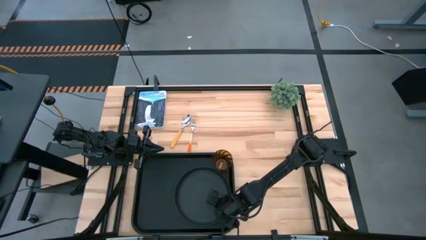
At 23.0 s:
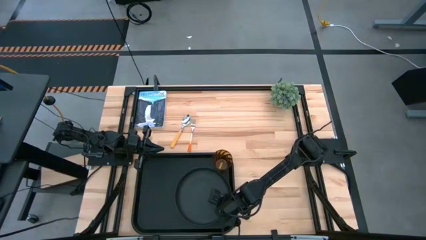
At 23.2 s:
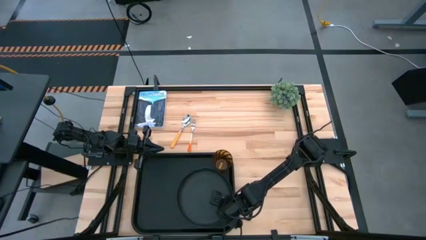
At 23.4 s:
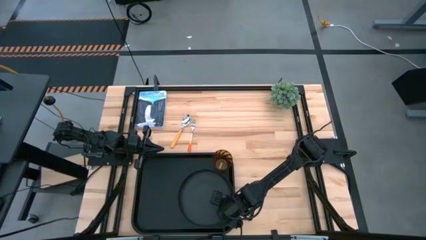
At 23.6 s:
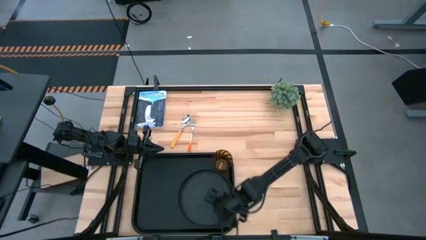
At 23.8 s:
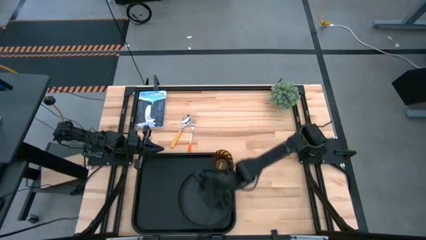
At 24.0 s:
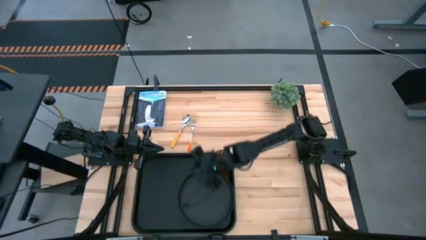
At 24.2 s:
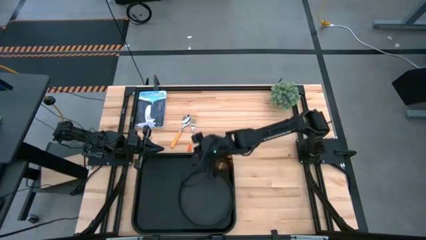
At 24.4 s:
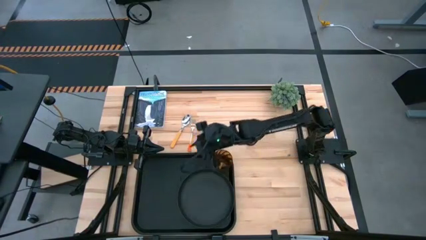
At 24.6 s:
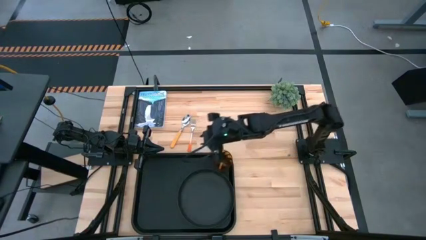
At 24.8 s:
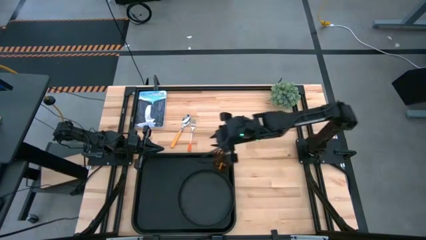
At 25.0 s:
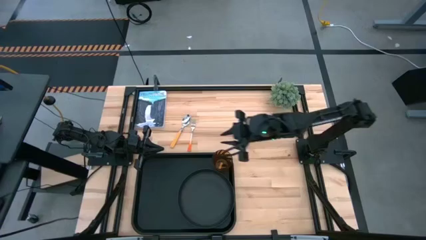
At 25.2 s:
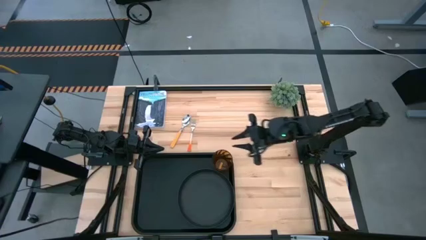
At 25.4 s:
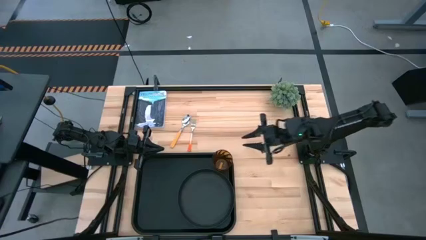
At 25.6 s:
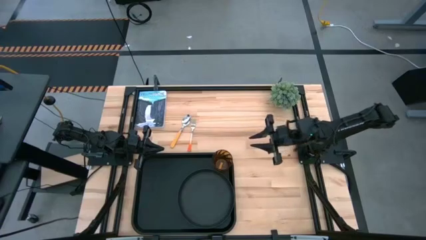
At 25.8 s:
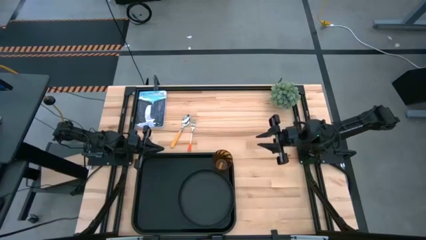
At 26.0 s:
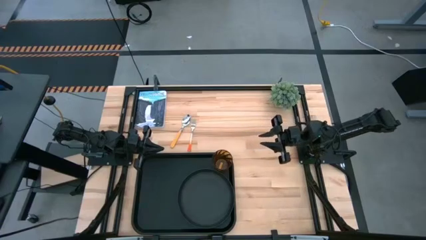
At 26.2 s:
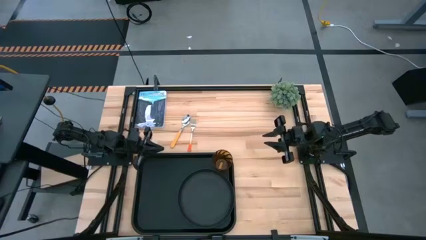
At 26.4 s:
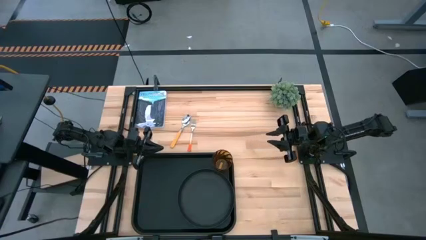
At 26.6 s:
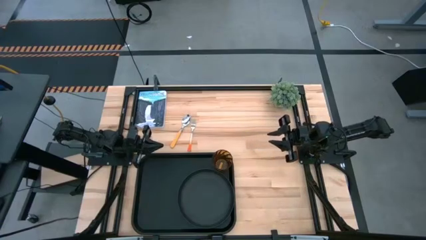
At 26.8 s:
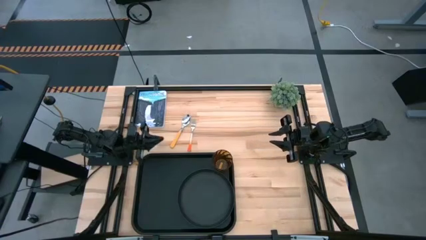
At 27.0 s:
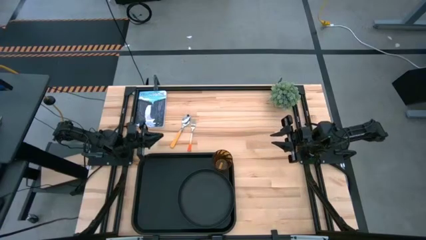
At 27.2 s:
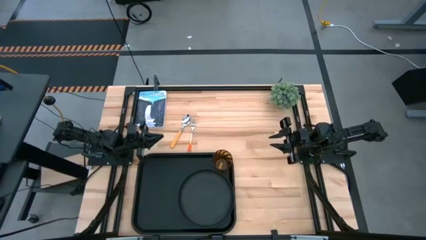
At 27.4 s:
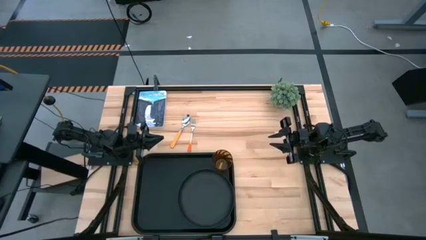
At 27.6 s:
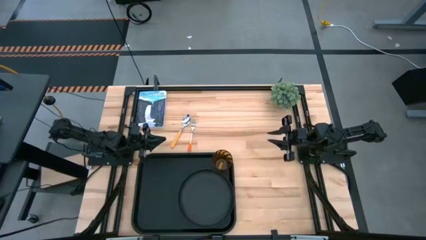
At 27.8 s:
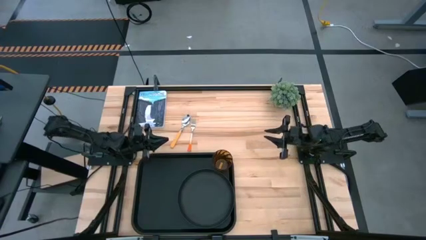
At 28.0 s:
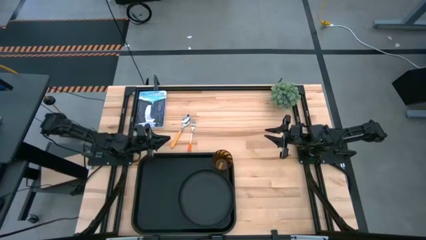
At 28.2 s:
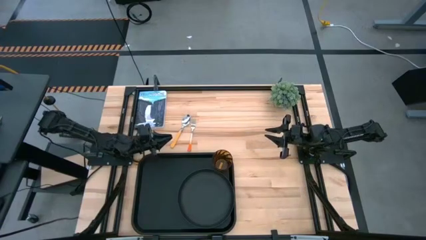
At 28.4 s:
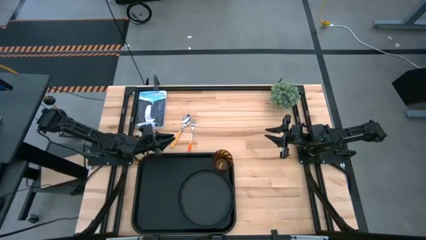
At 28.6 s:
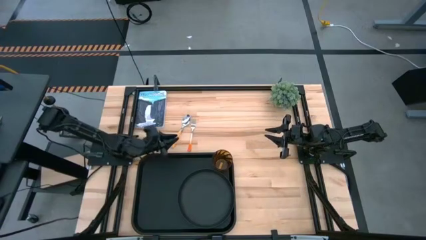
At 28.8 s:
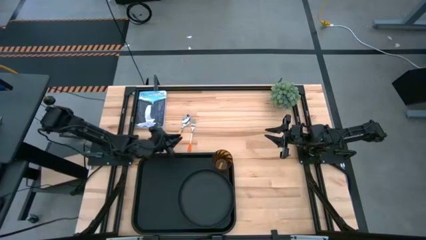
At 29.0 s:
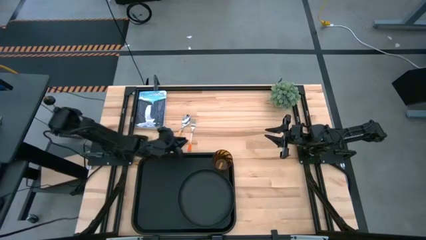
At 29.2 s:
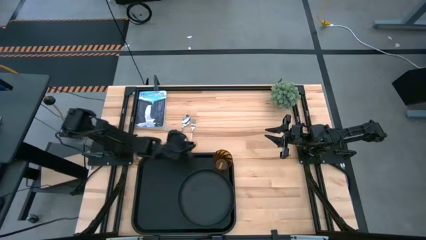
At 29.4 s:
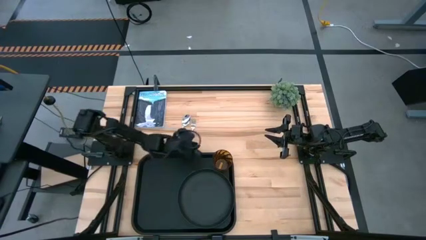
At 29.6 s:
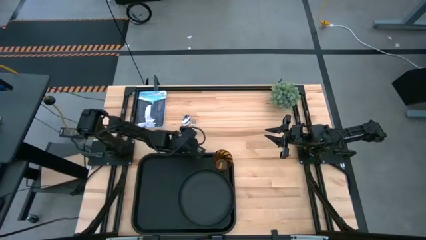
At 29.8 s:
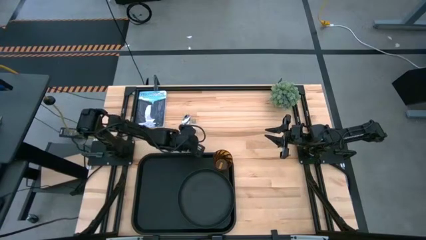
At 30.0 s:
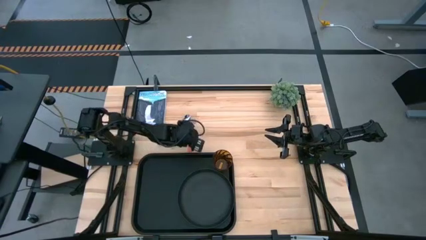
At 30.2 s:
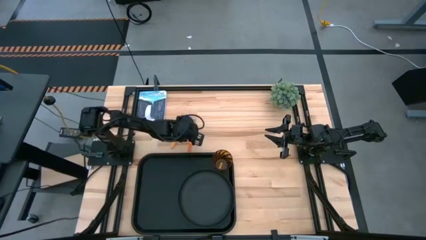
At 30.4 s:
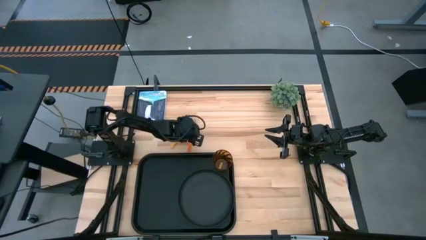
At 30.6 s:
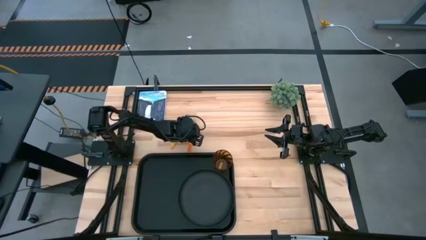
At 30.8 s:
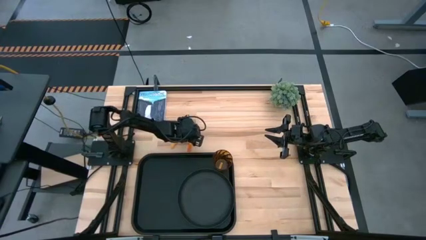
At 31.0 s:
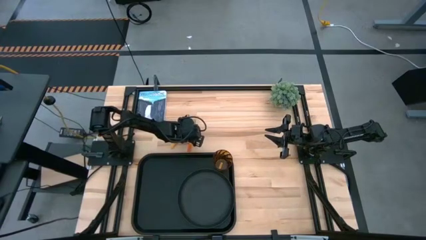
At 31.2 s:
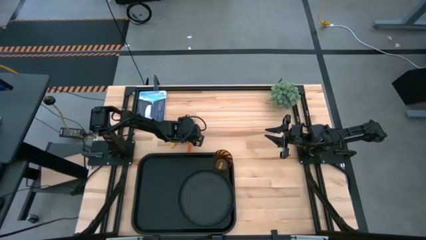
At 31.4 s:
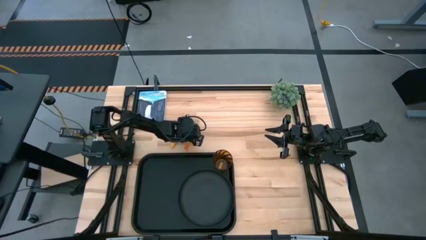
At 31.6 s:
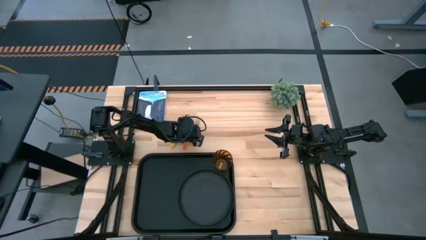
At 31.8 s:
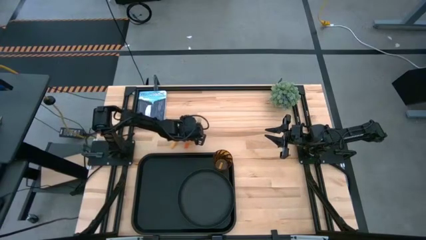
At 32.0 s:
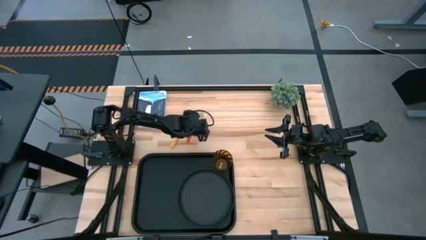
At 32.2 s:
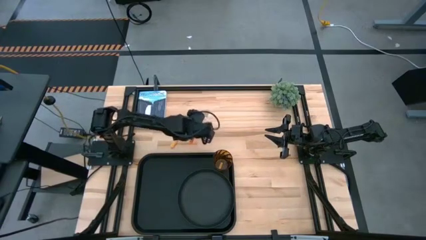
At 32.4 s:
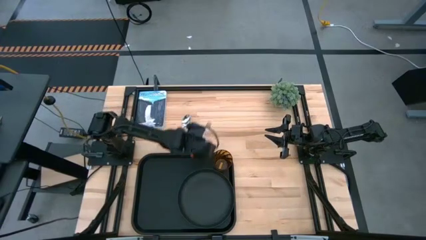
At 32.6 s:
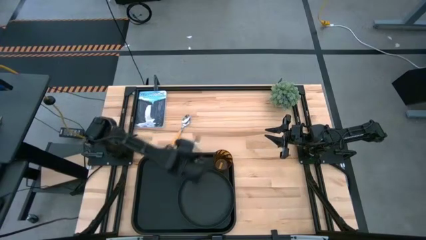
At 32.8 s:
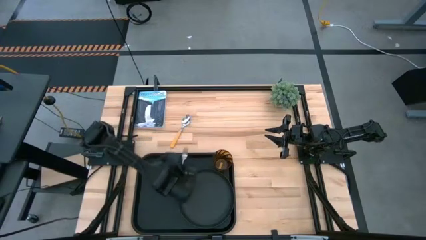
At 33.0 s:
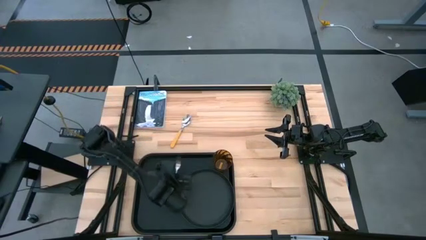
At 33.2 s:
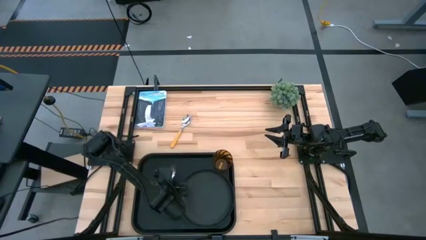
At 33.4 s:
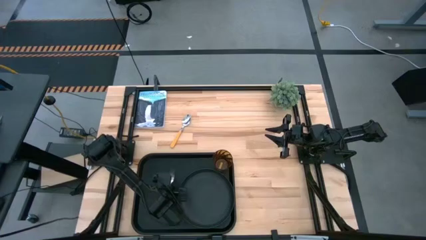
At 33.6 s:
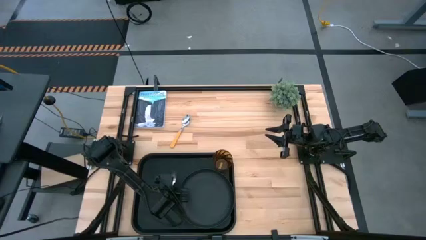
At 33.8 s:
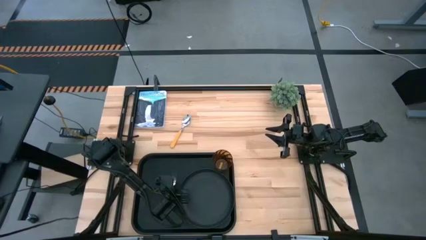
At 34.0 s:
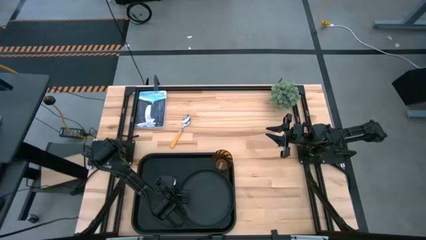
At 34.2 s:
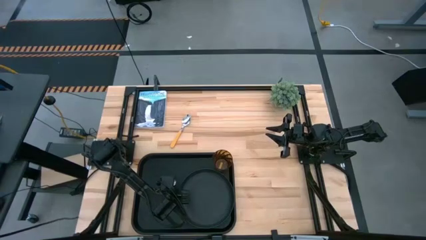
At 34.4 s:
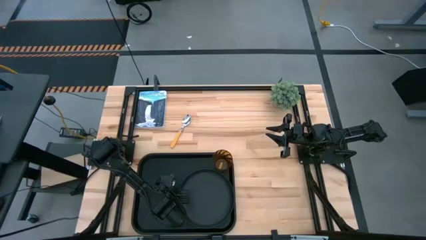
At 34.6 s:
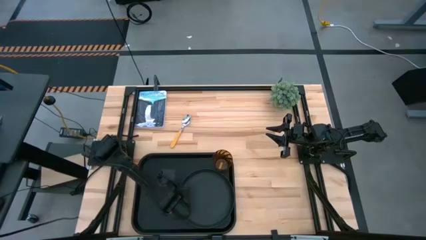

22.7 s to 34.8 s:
Task: Pick and place plate/cup/fork/spoon on tray
Put the orange fork on the black serving tray to the left of the black plate

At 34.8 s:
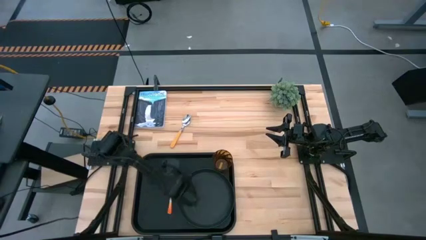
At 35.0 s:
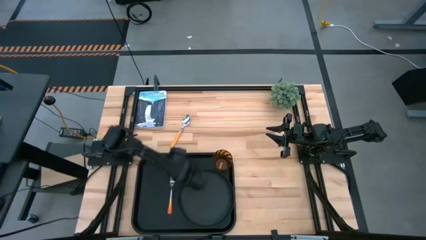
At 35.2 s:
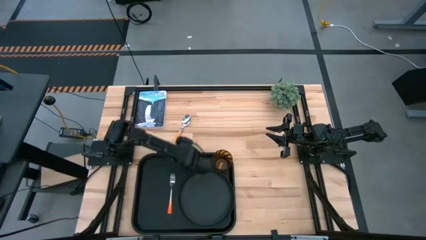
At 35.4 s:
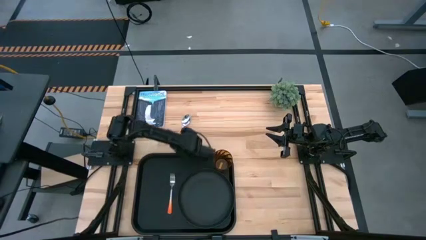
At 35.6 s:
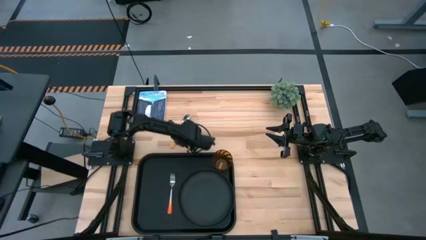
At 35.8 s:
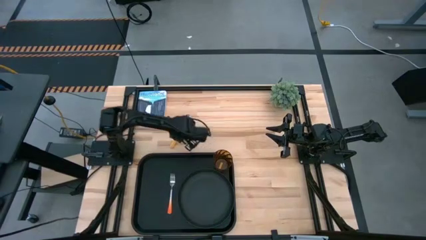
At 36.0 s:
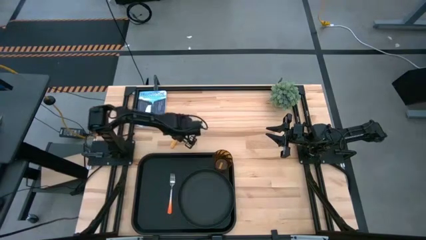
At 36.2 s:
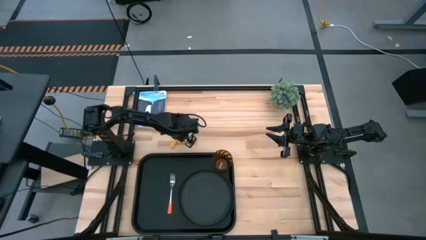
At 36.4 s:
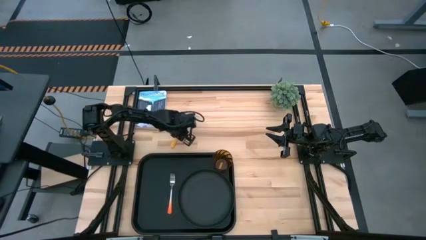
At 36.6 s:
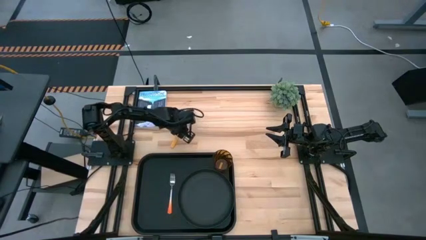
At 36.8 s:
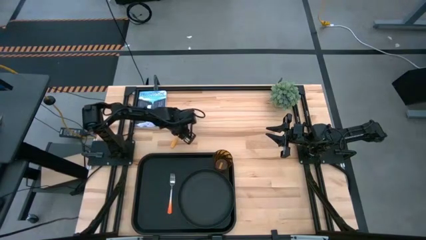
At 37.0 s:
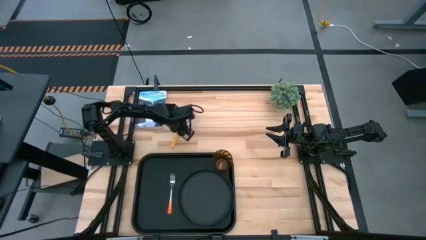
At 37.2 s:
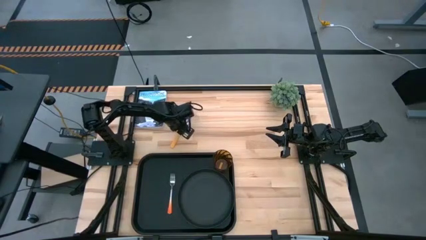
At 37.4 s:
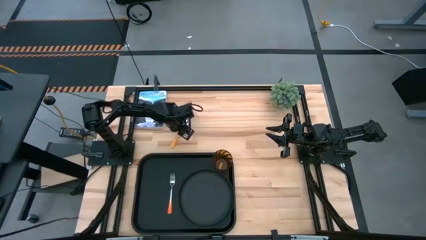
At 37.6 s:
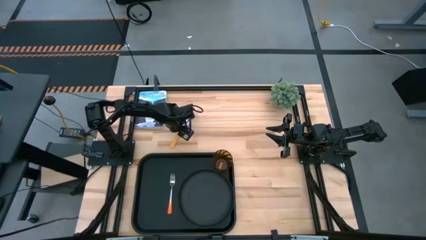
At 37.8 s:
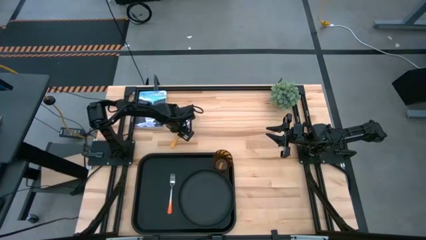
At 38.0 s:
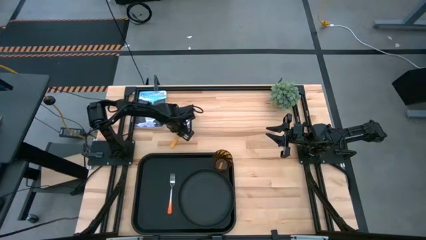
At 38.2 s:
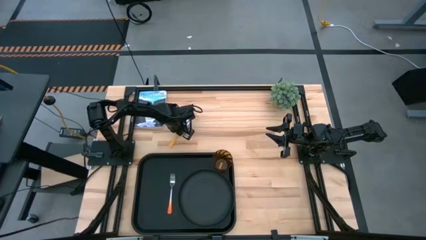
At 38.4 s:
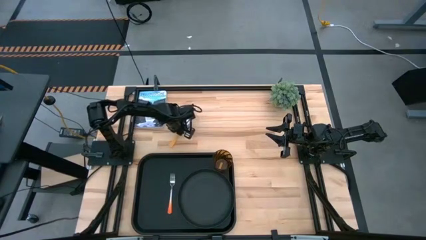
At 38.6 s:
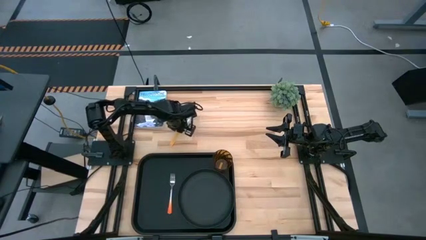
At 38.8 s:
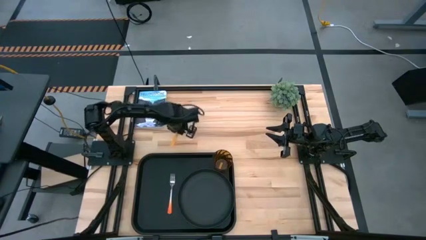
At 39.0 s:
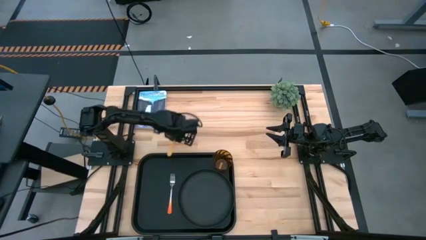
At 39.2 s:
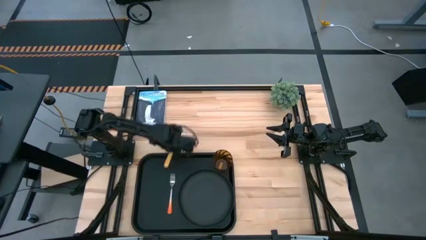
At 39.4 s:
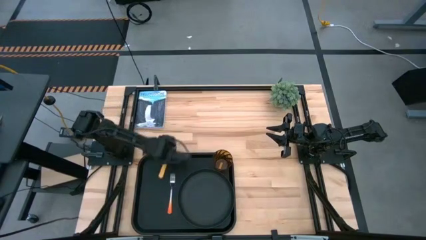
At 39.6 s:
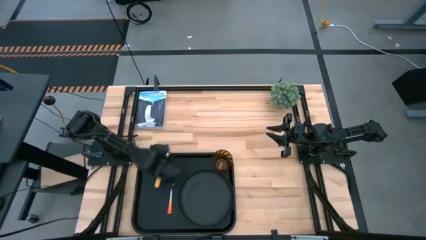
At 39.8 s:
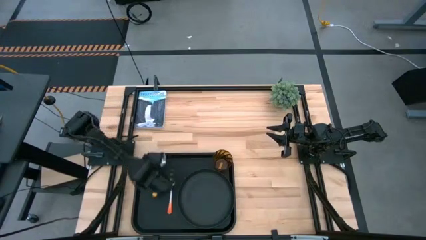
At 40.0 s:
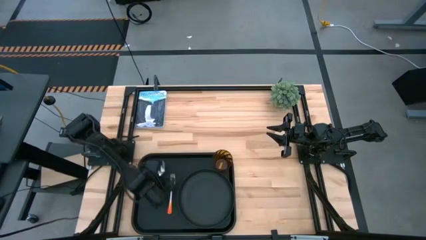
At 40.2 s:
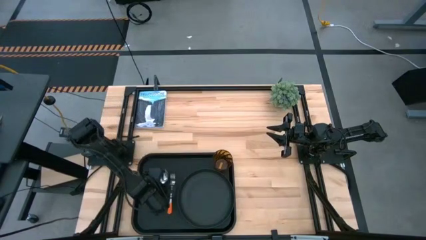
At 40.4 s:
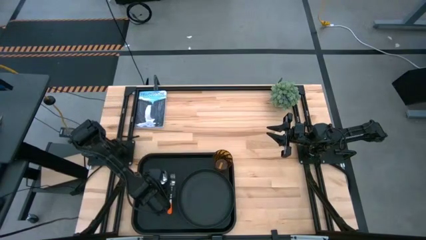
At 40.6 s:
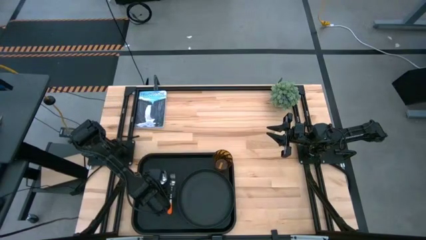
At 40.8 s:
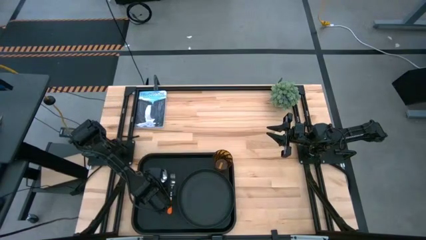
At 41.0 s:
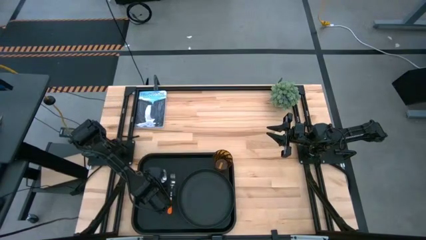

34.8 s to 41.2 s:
Put the orange spoon on the black serving tray to the left of the orange fork
